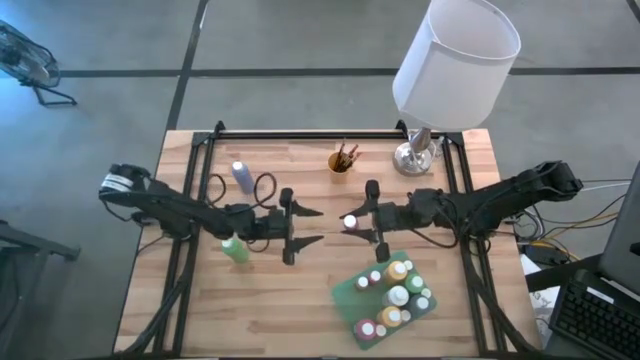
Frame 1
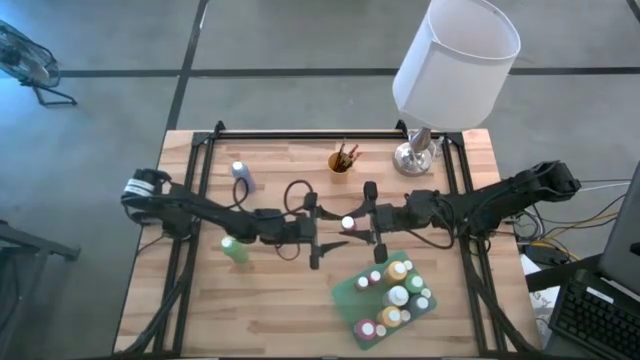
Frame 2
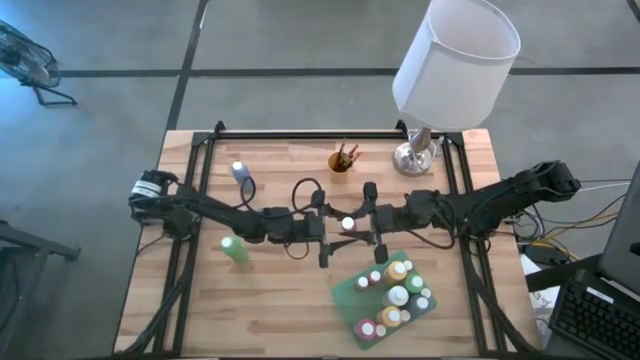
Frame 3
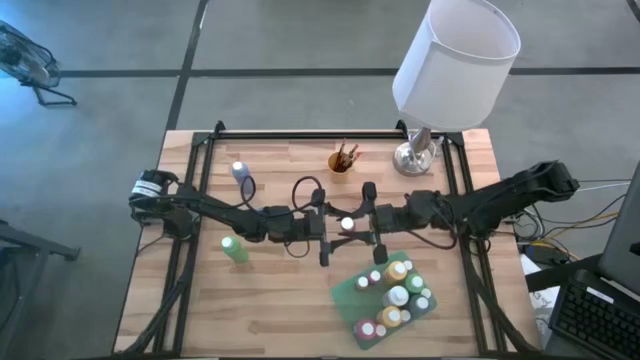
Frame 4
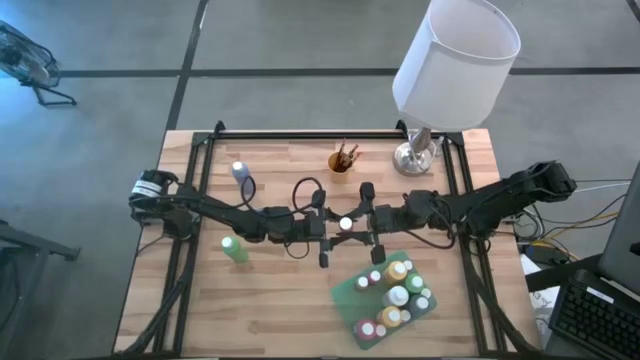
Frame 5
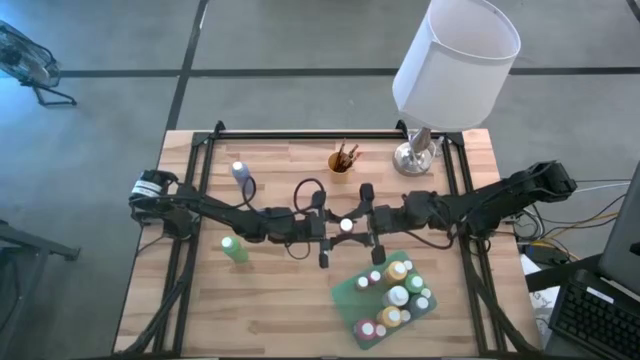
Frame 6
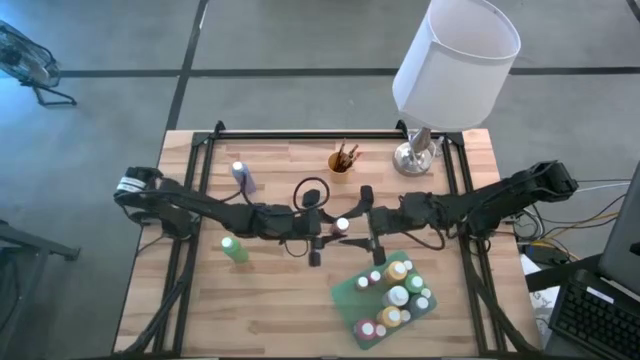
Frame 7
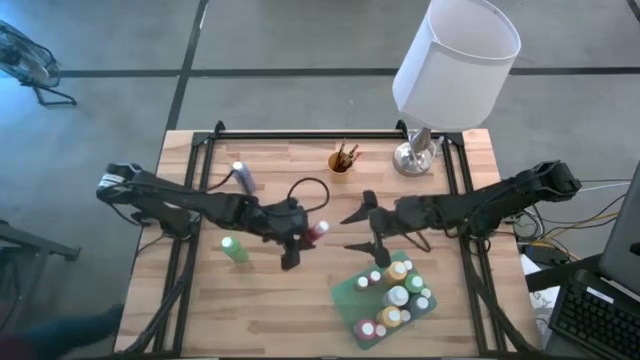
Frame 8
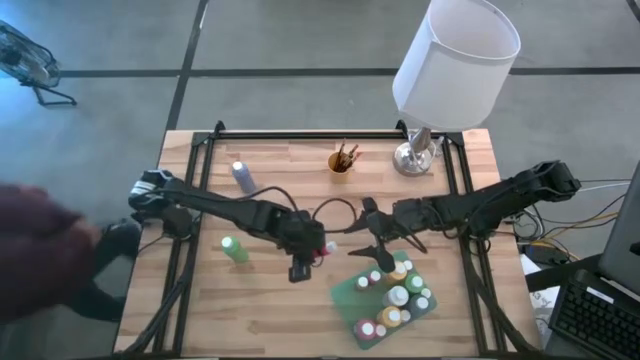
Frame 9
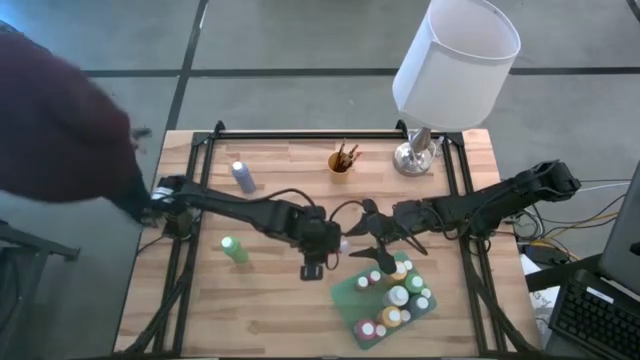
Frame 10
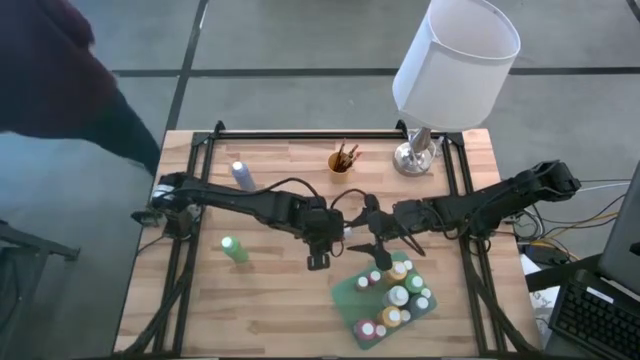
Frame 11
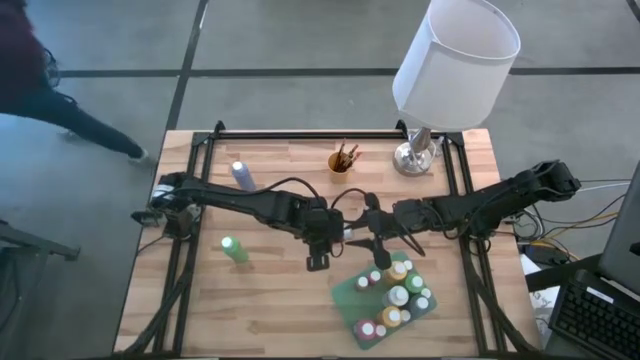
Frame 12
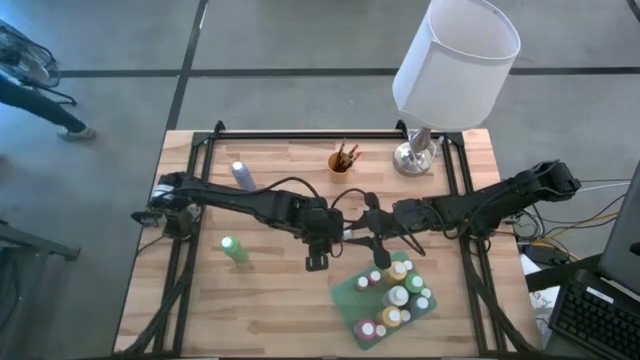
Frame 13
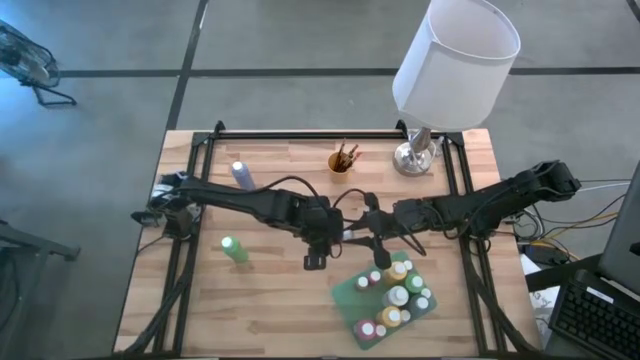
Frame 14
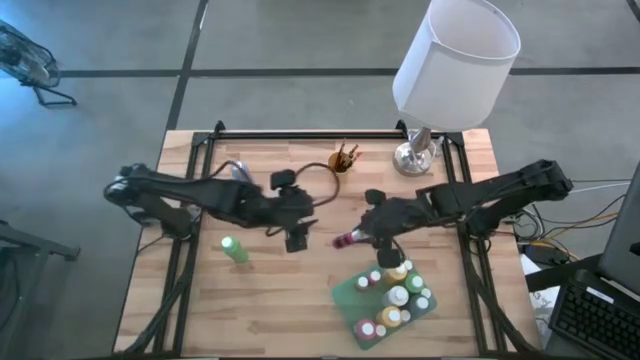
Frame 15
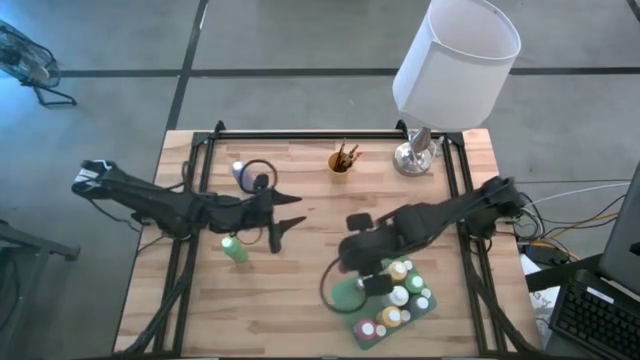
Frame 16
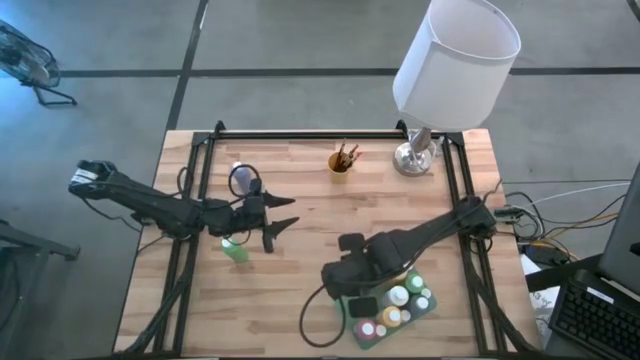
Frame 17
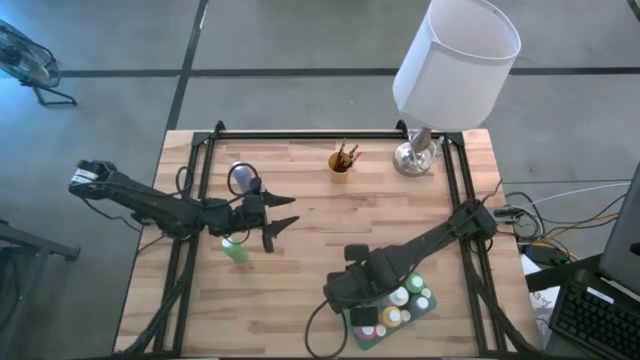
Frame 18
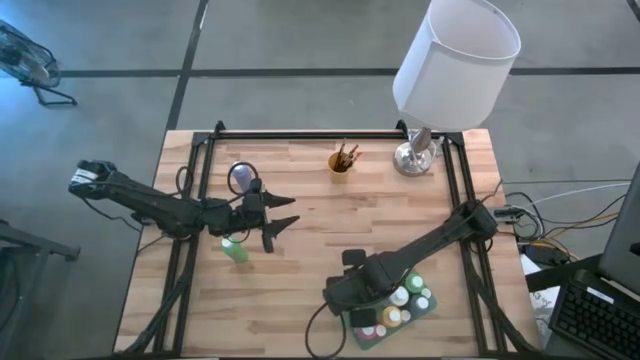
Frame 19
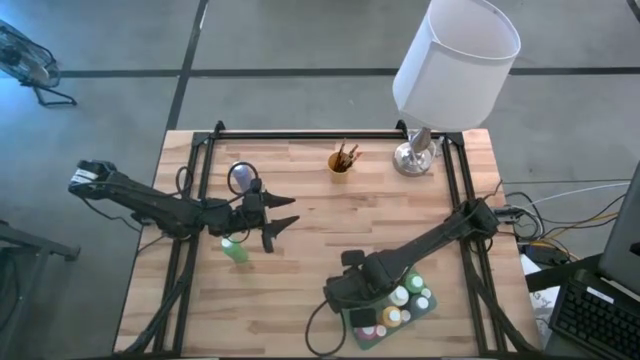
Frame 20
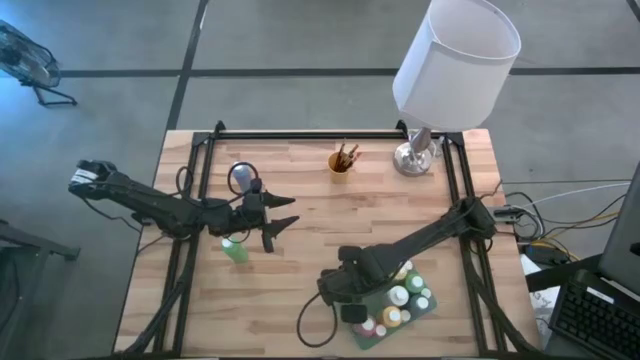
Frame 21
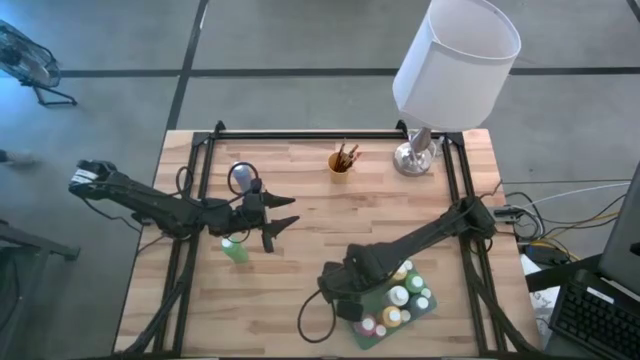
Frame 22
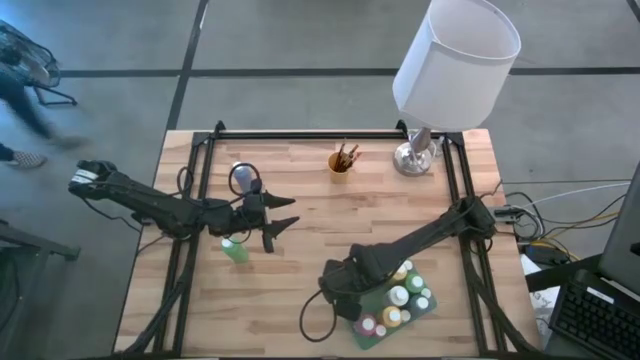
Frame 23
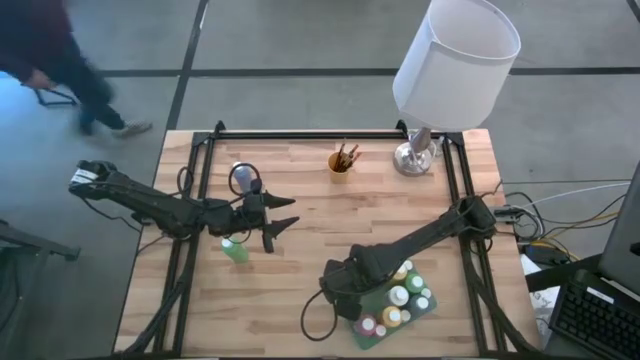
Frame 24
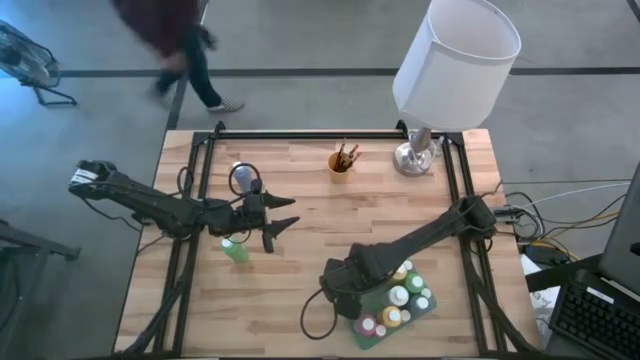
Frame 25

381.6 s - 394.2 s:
Task: Pick & Place Paint Supplies
Put the red paint bottle into the green bin

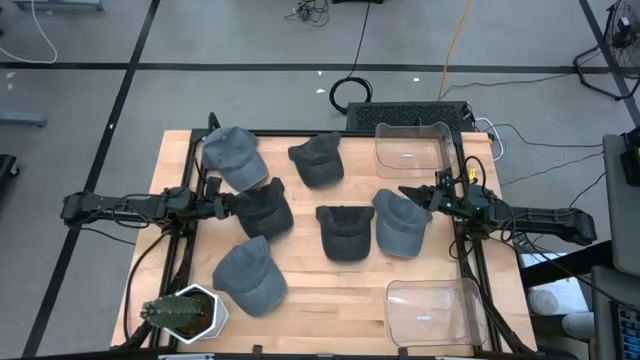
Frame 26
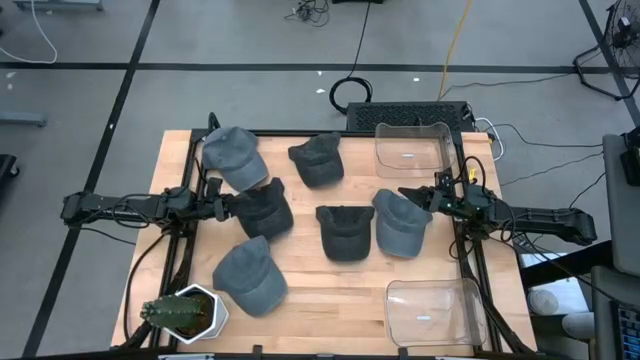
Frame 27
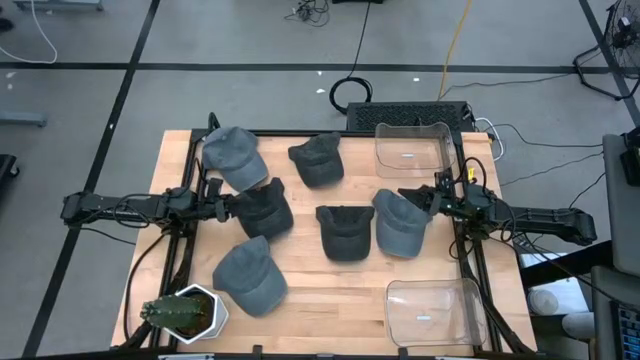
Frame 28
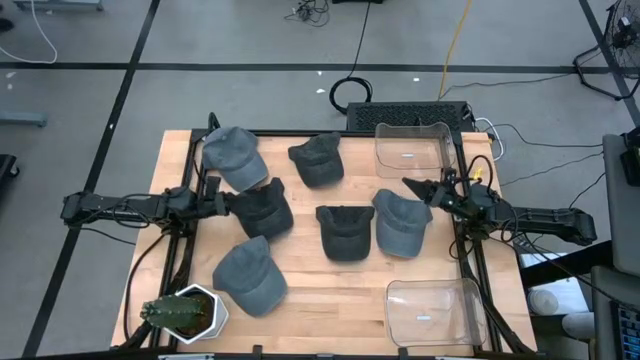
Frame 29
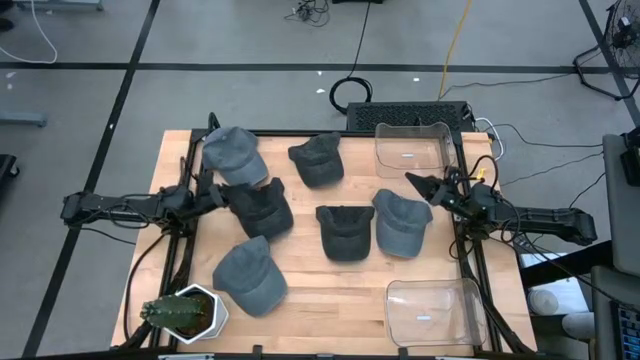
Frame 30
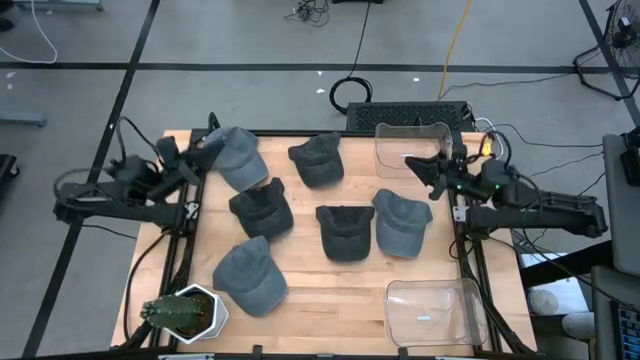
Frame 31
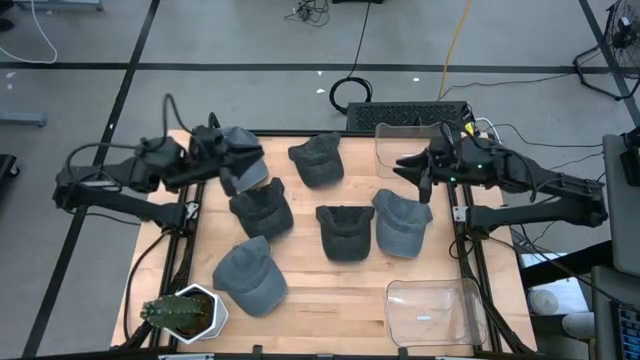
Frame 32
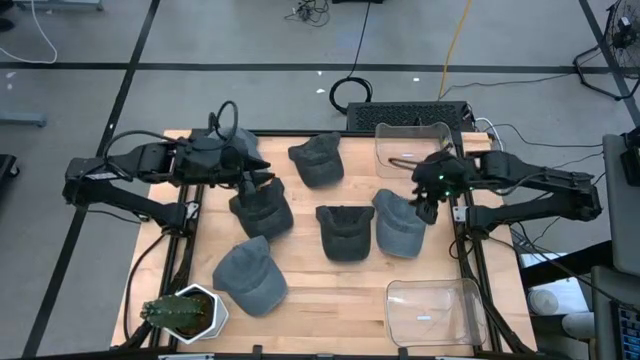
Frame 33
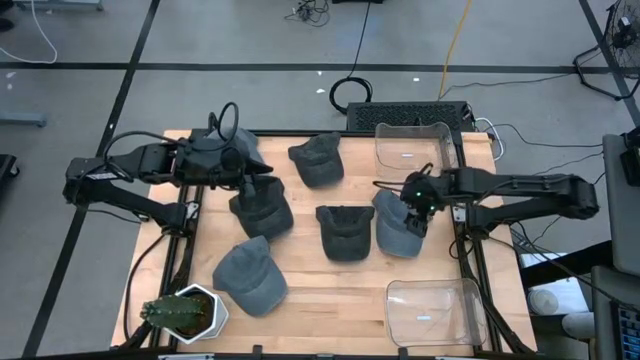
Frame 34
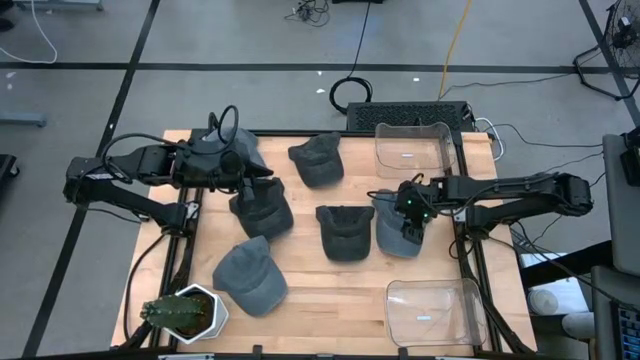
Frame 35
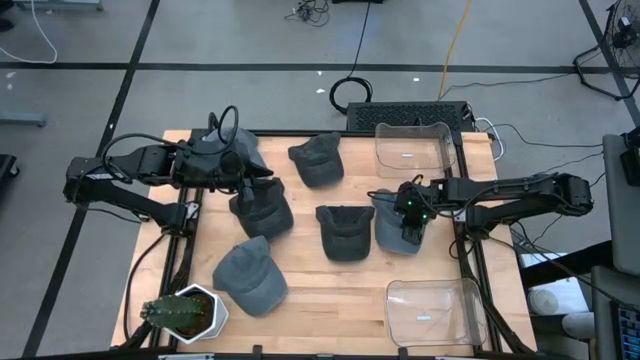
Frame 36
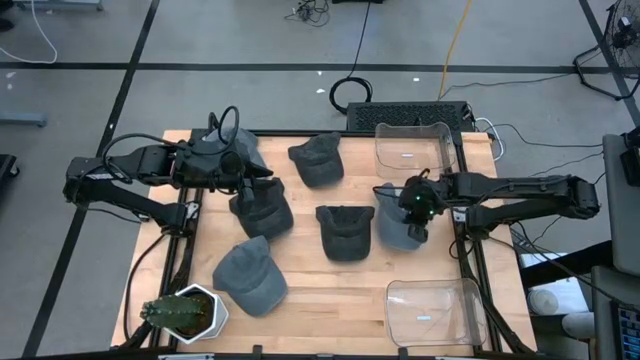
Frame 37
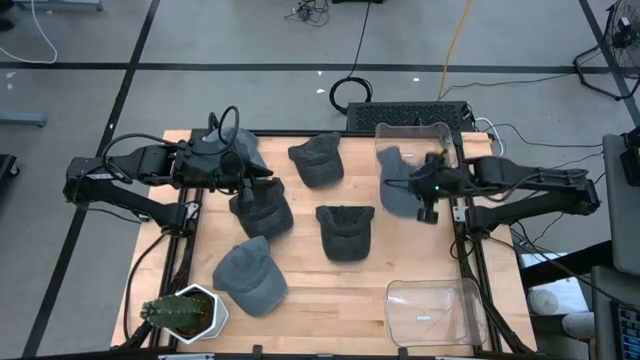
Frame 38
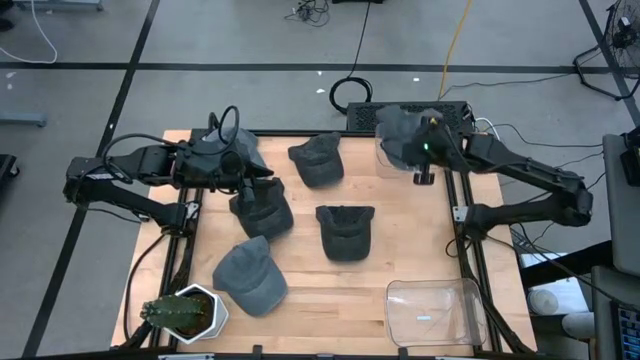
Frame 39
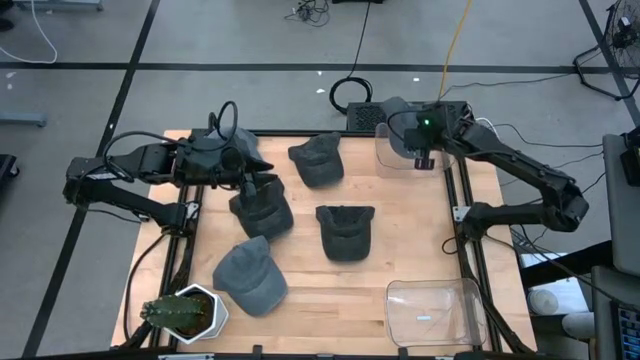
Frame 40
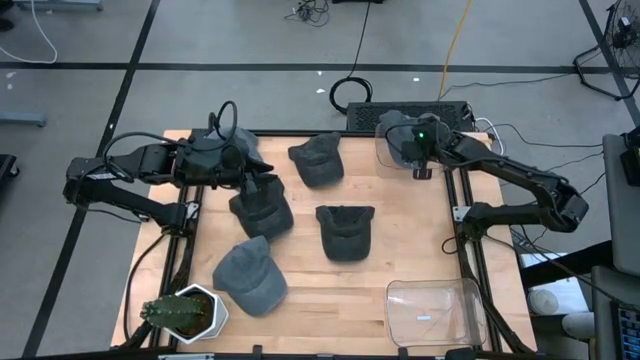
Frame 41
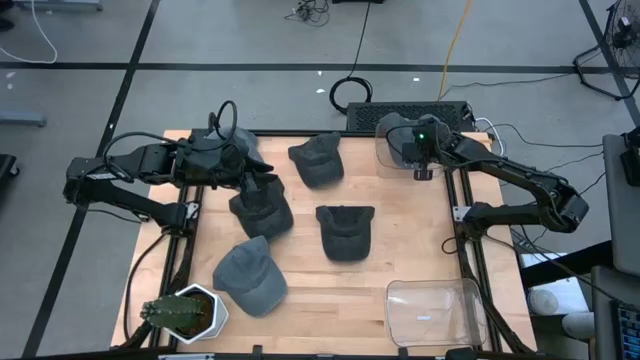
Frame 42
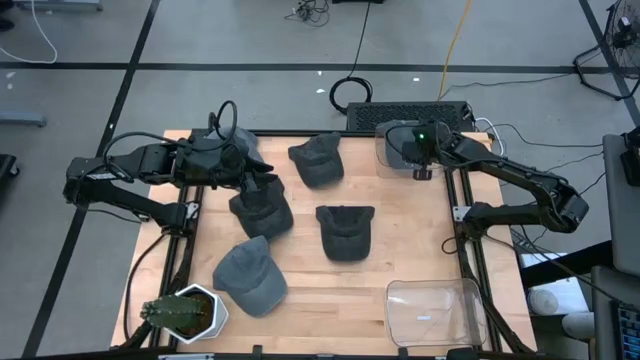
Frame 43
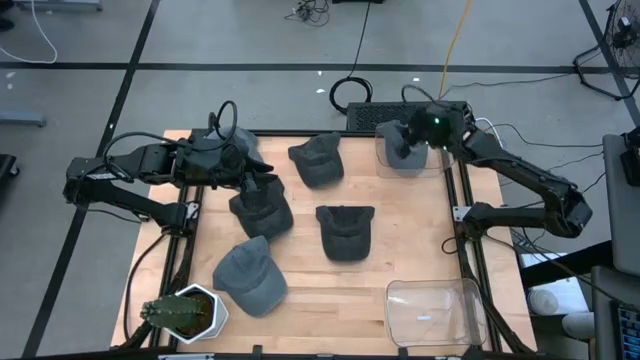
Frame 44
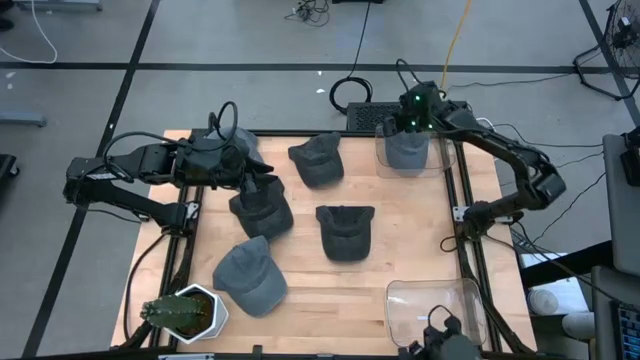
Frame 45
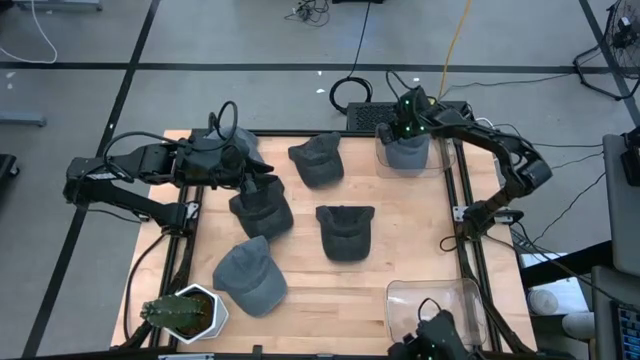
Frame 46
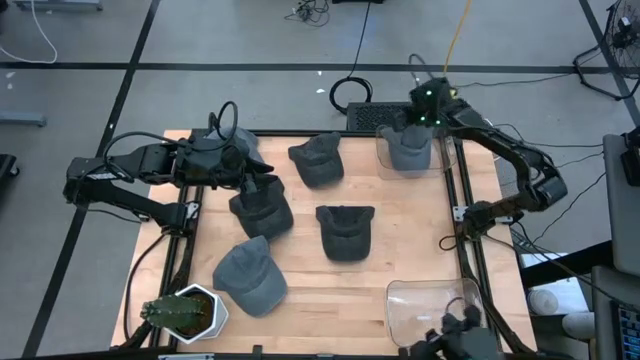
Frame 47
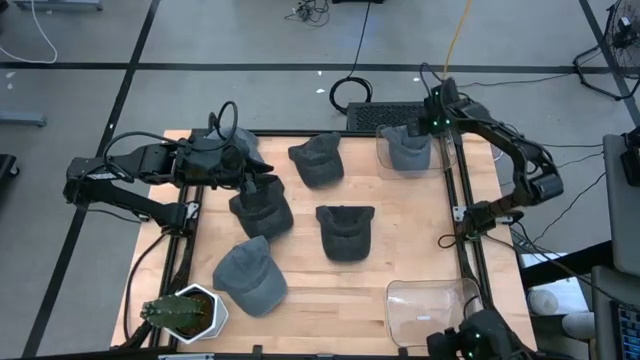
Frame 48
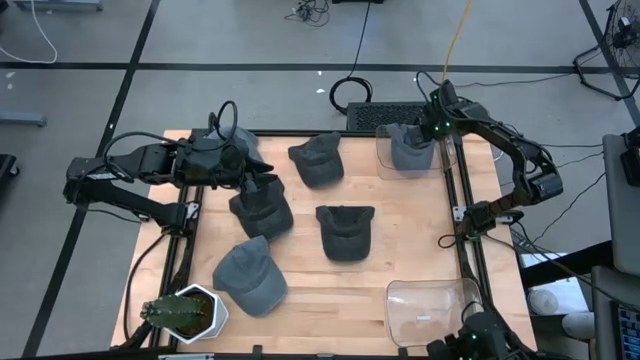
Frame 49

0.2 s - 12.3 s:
Task: Pick & Place hat
Put the middle gray cap into the top transparent bin
